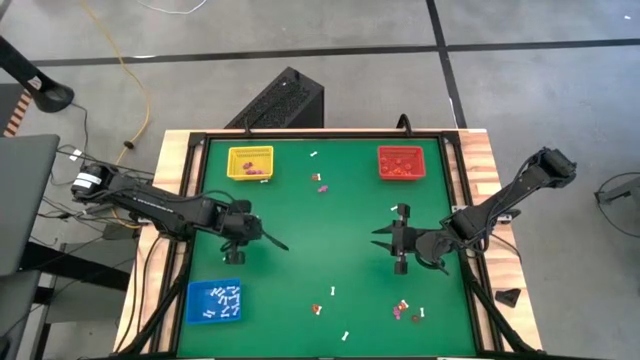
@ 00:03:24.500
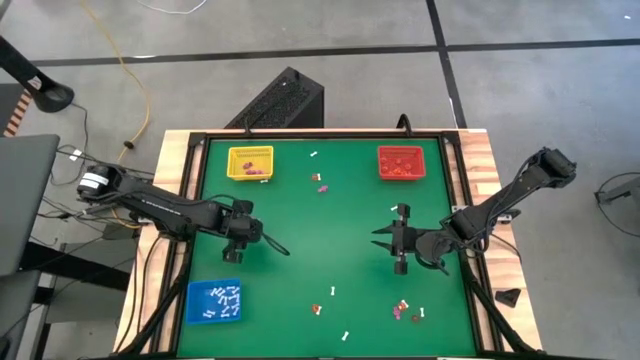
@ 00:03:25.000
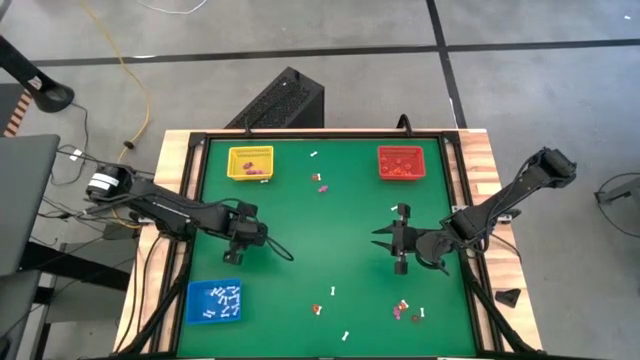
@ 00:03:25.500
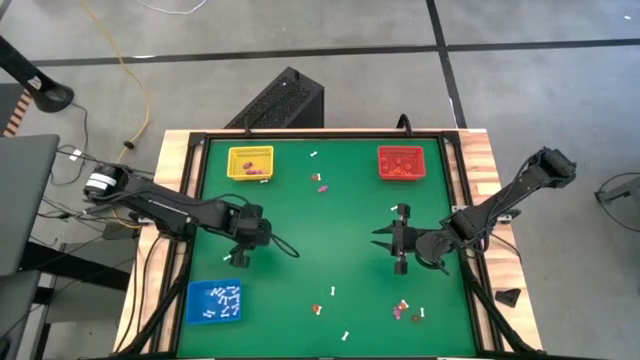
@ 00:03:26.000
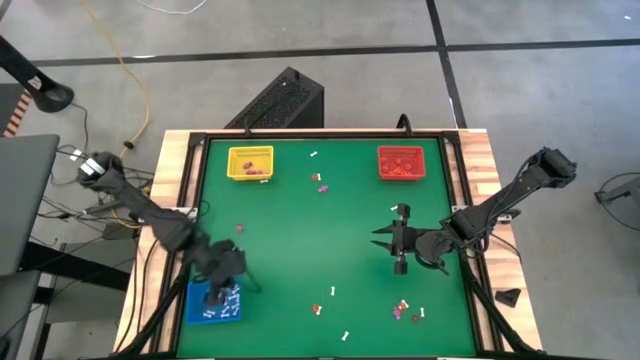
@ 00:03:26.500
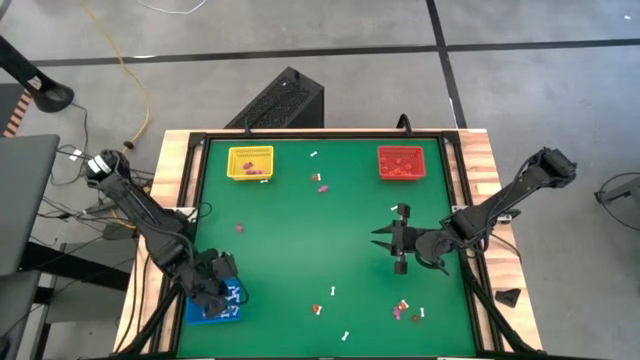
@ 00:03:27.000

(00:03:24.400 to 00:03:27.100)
Task: Sort Halloween decoration
Put the white bone toy into the blue bin

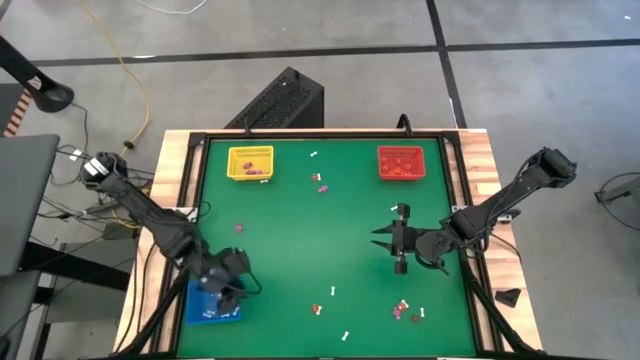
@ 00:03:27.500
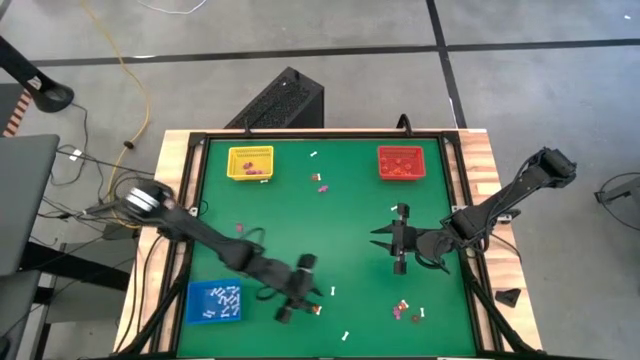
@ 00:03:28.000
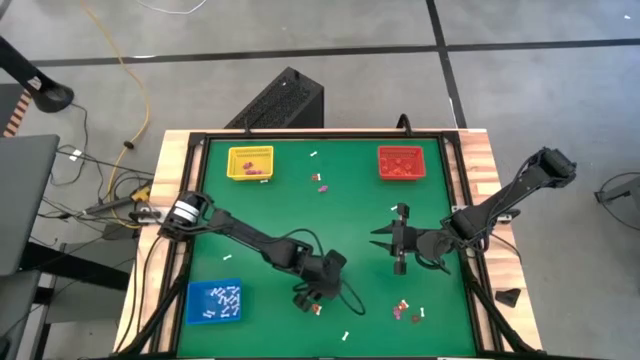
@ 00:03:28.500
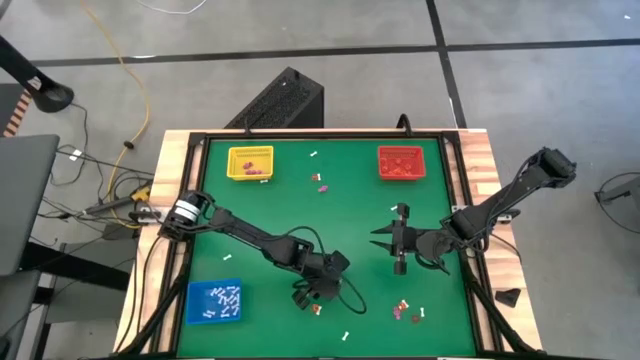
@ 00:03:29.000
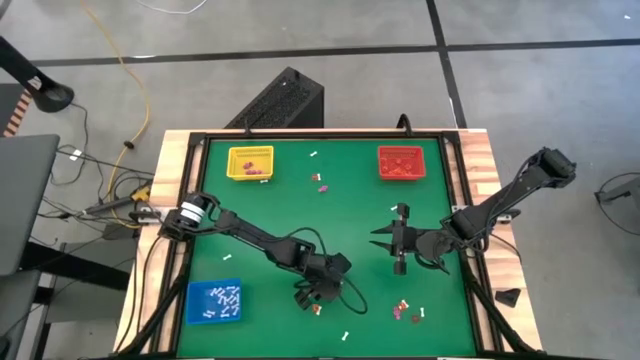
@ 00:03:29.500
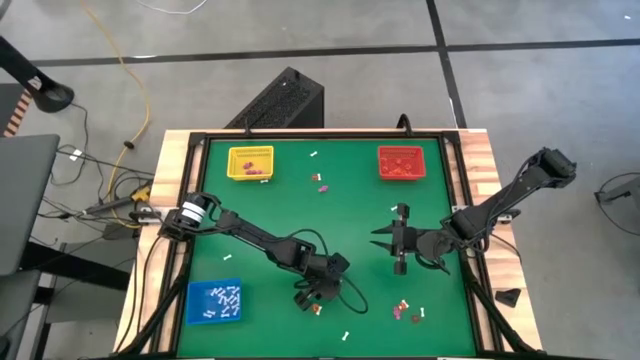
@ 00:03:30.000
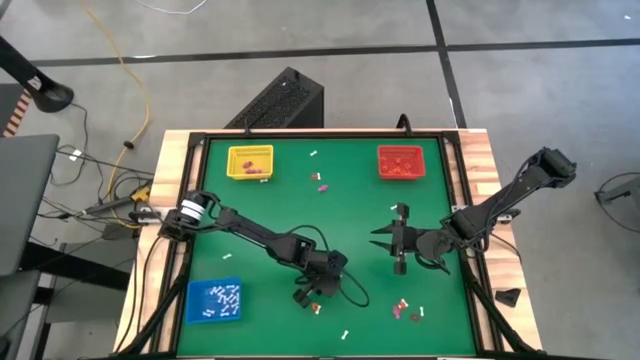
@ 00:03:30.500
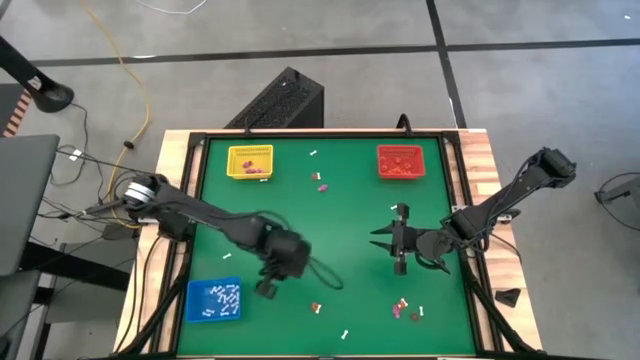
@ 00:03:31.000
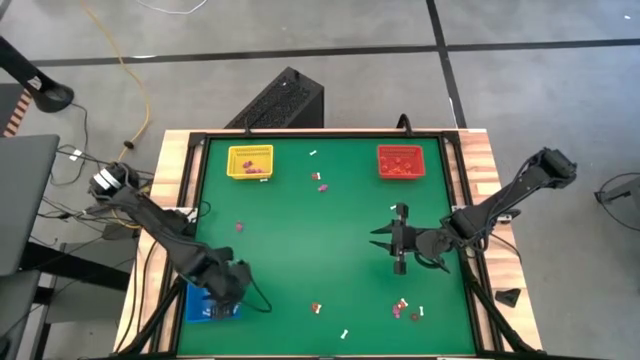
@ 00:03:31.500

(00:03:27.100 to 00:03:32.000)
Put the white bone toy into the blue bin

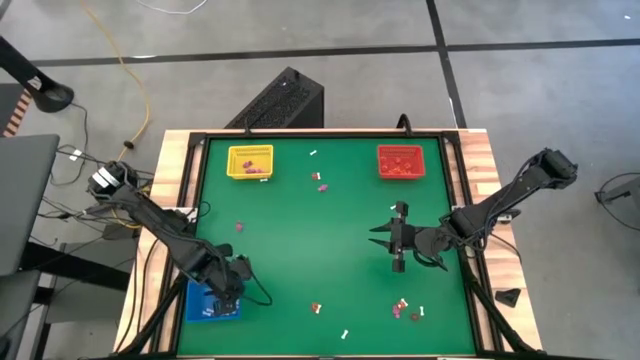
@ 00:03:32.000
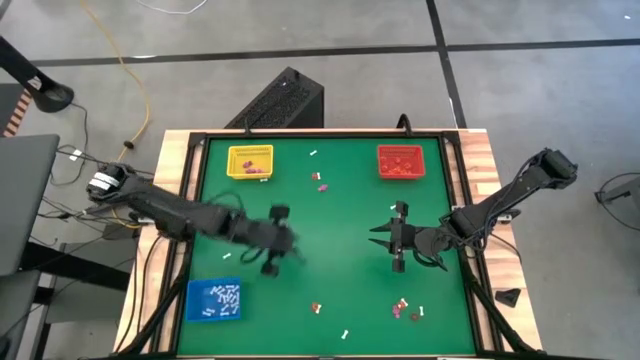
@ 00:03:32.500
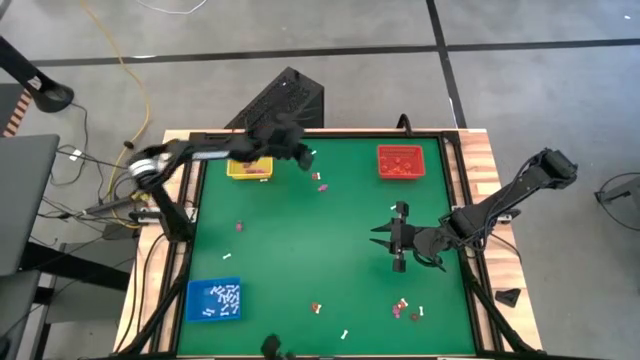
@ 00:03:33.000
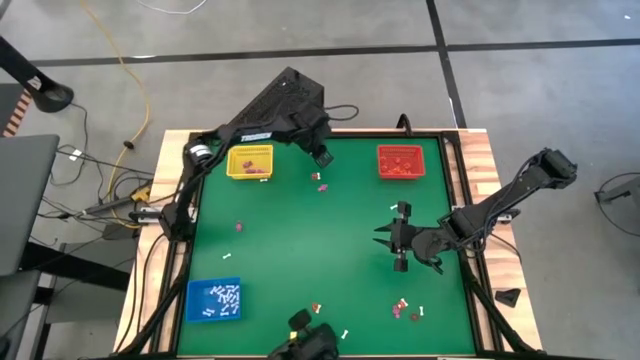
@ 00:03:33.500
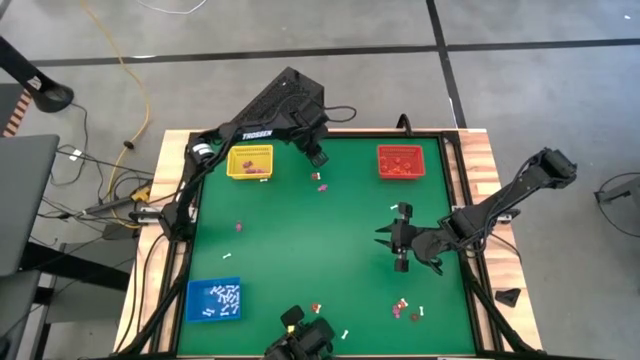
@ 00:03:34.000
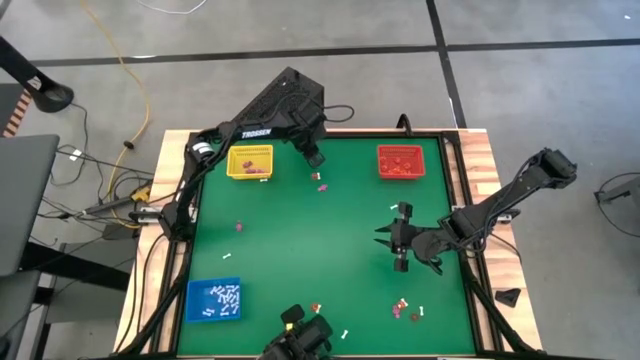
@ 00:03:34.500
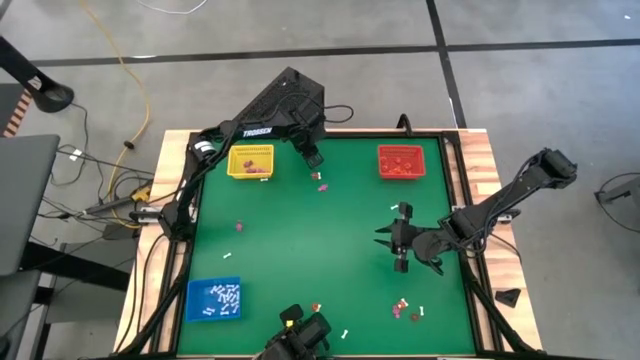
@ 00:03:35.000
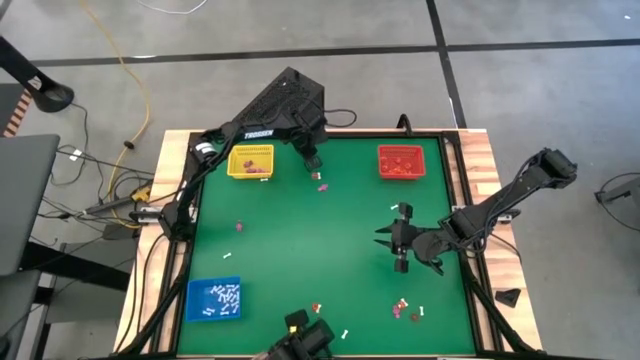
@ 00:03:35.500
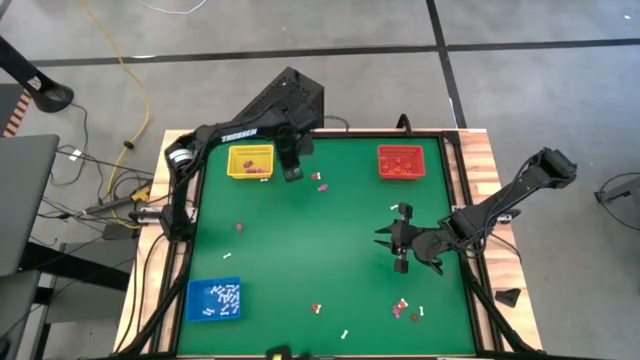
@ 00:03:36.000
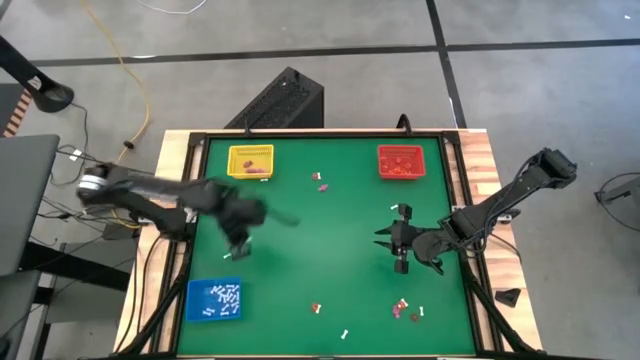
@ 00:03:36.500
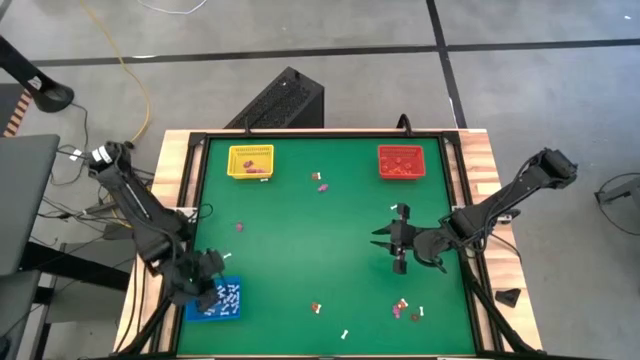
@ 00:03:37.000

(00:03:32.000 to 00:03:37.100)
Put the white bone toy into the blue bin

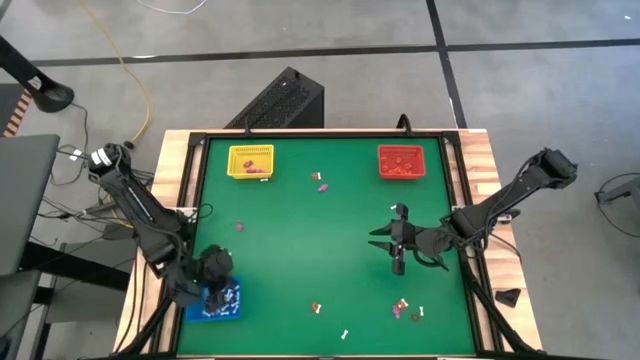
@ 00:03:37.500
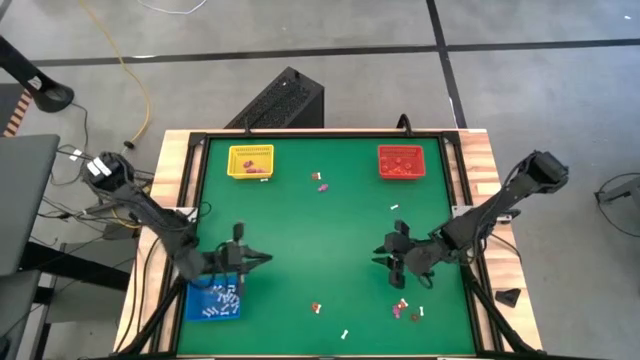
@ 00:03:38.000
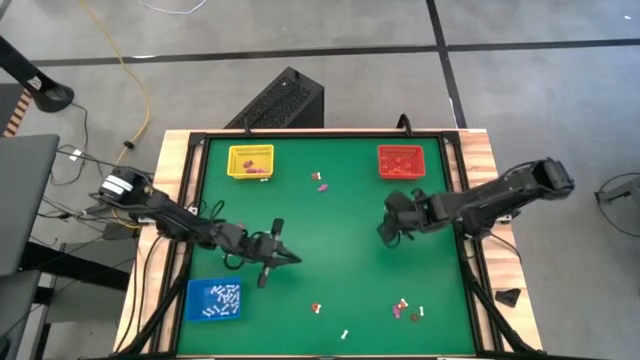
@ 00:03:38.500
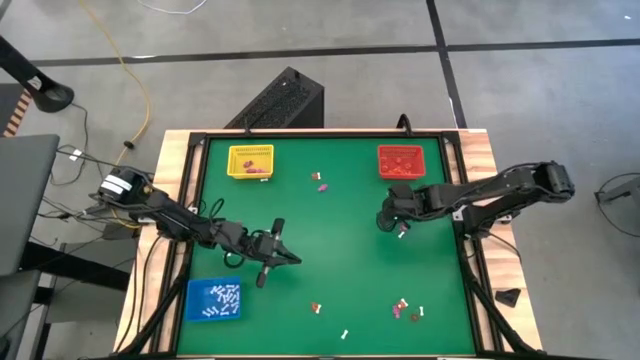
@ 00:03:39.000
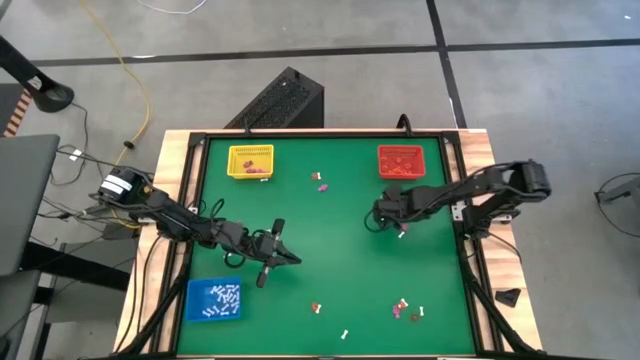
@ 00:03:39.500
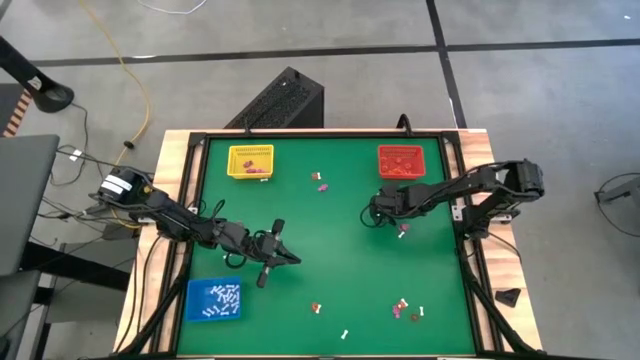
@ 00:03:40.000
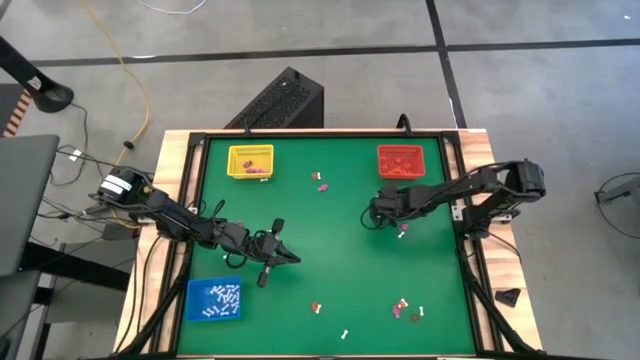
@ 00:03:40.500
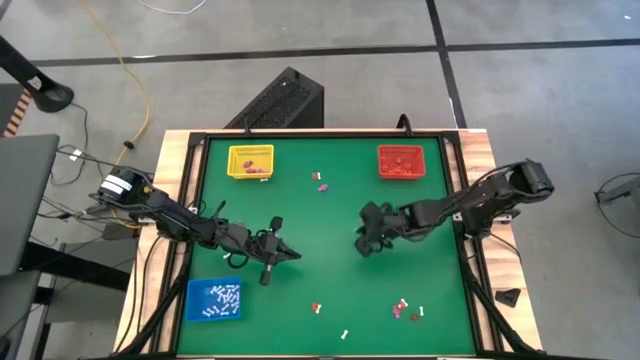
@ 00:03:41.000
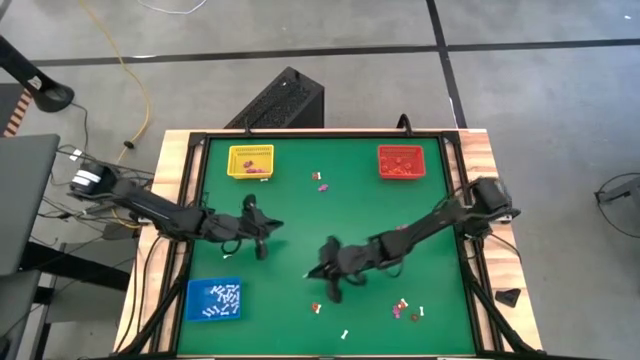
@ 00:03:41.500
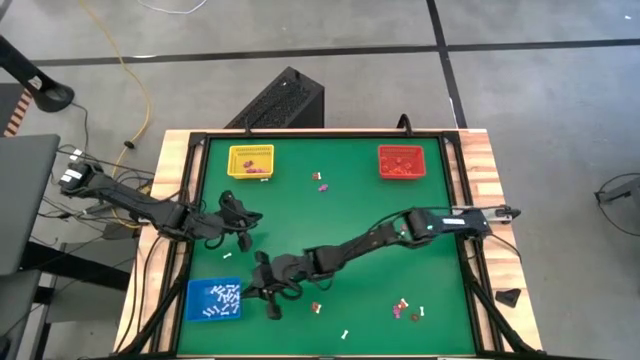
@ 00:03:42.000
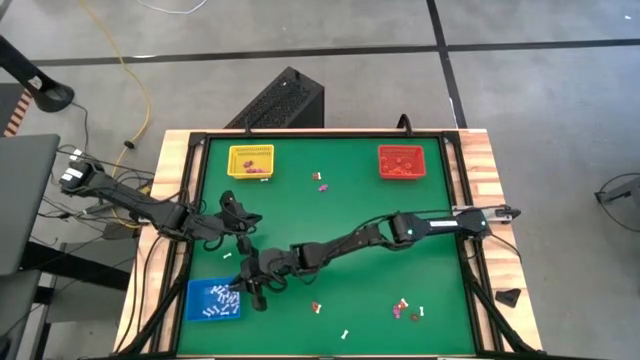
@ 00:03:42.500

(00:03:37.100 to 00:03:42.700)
Put the white bone toy into the blue bin
